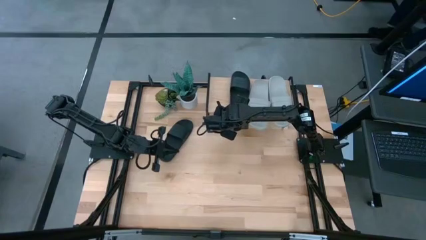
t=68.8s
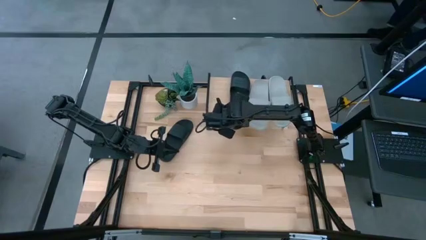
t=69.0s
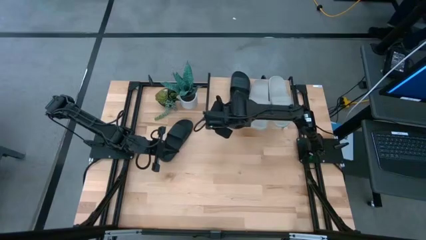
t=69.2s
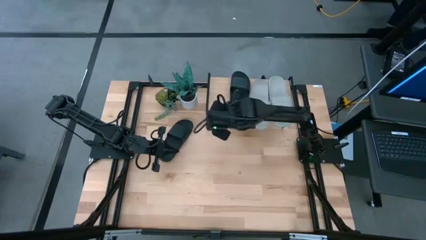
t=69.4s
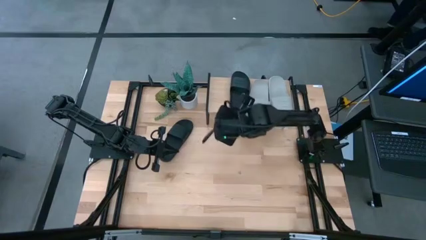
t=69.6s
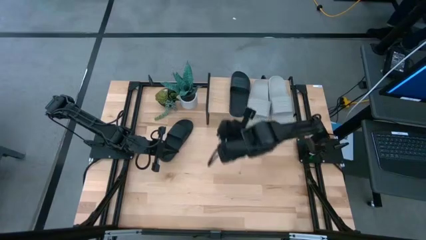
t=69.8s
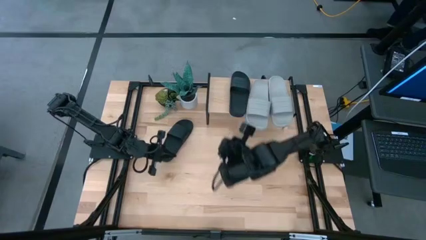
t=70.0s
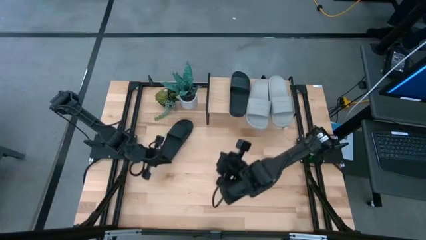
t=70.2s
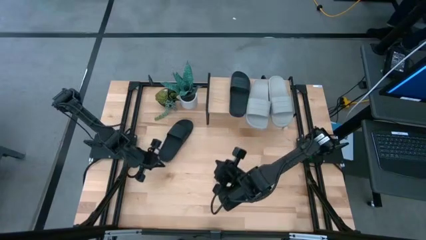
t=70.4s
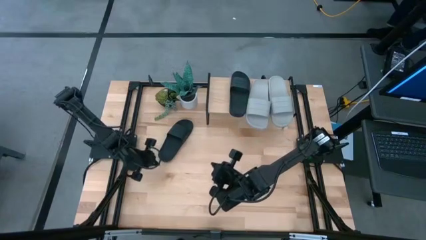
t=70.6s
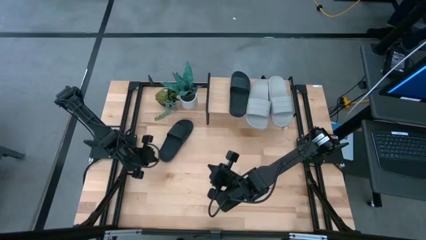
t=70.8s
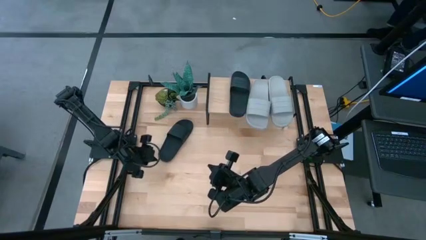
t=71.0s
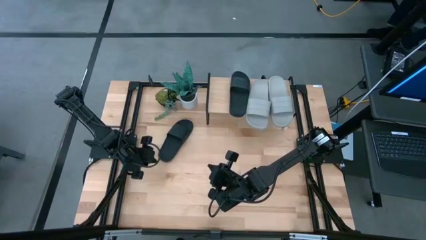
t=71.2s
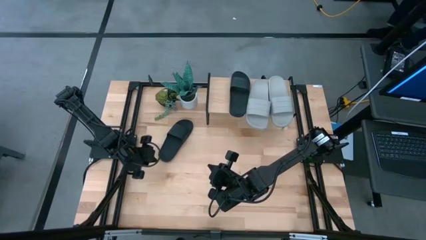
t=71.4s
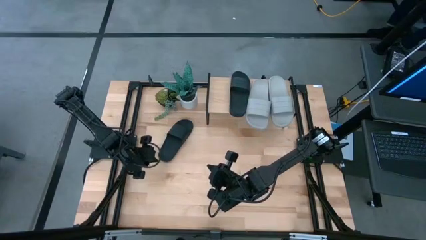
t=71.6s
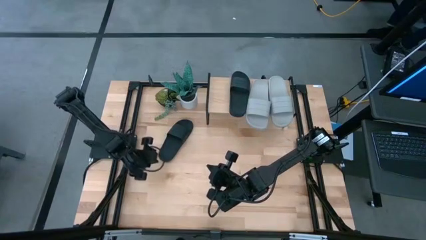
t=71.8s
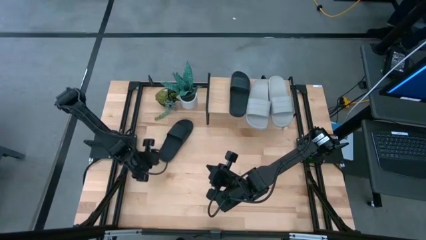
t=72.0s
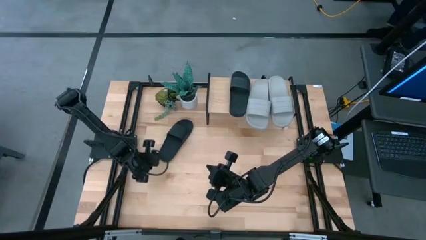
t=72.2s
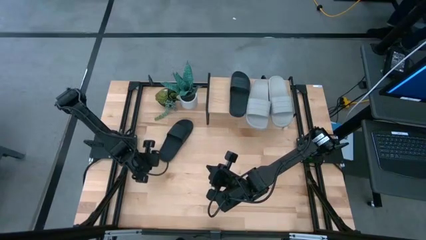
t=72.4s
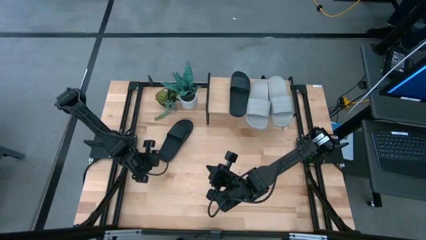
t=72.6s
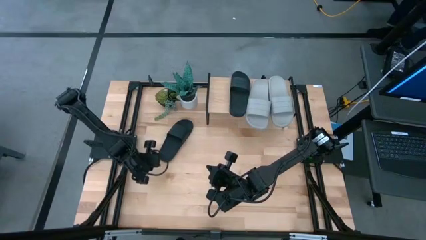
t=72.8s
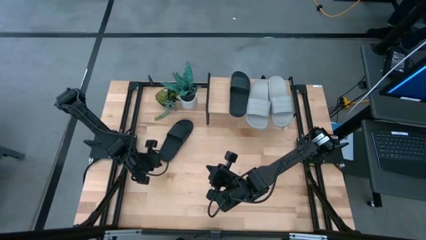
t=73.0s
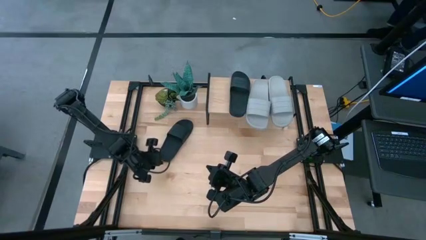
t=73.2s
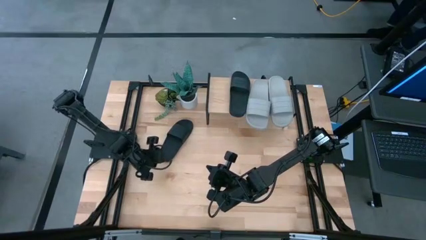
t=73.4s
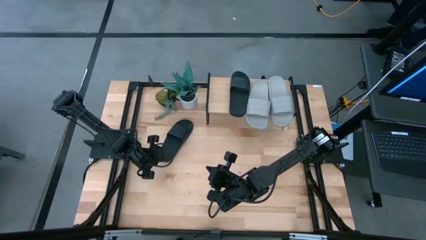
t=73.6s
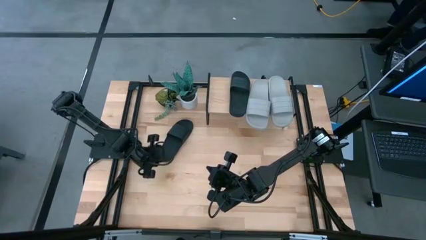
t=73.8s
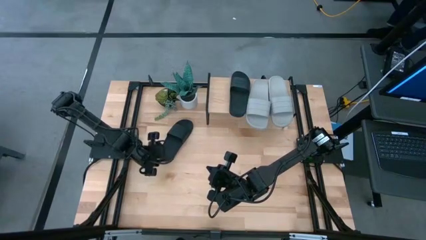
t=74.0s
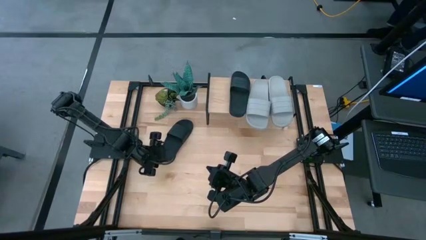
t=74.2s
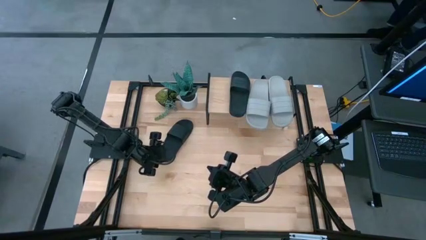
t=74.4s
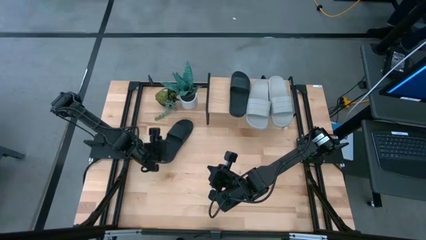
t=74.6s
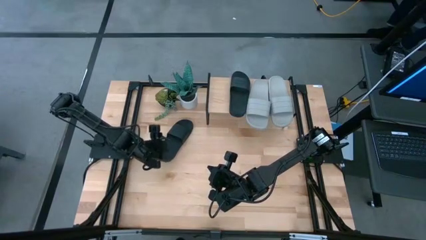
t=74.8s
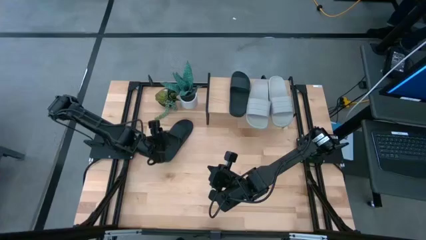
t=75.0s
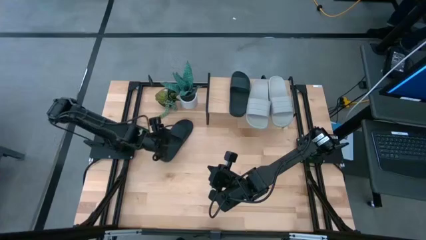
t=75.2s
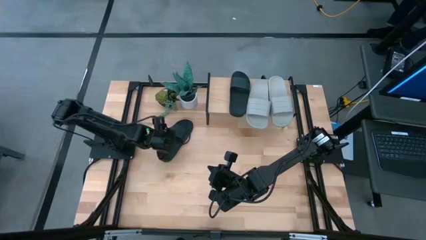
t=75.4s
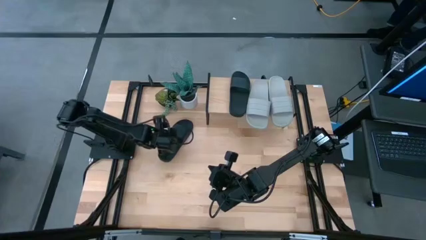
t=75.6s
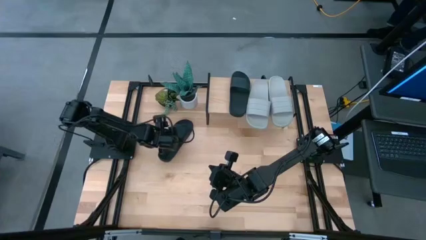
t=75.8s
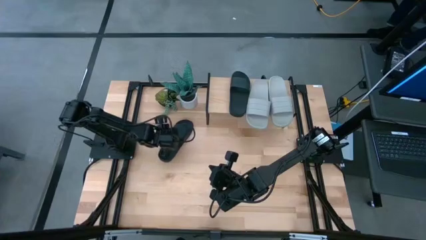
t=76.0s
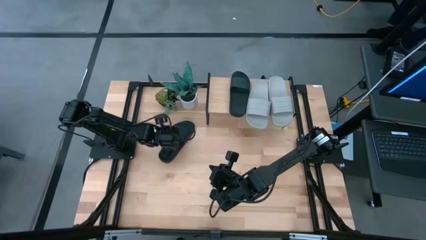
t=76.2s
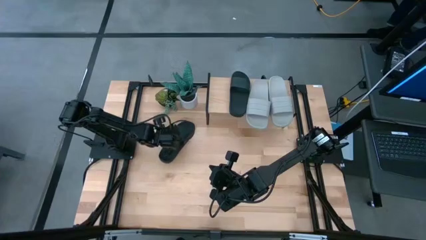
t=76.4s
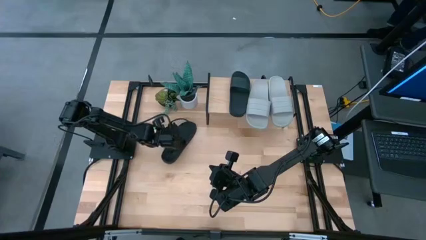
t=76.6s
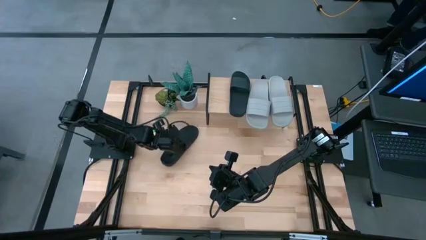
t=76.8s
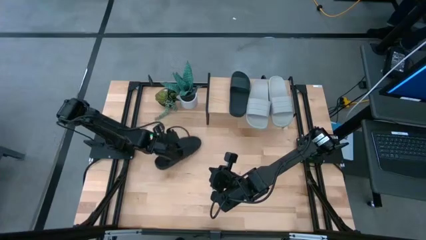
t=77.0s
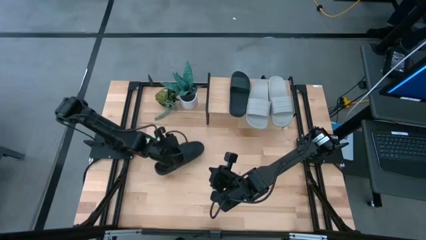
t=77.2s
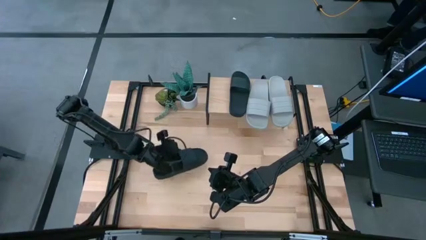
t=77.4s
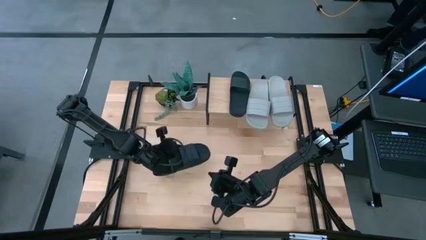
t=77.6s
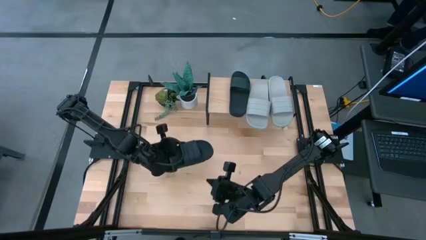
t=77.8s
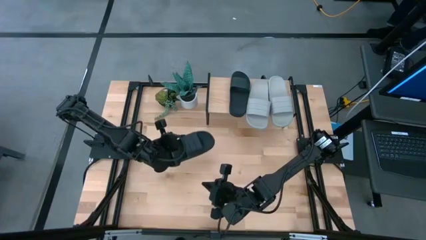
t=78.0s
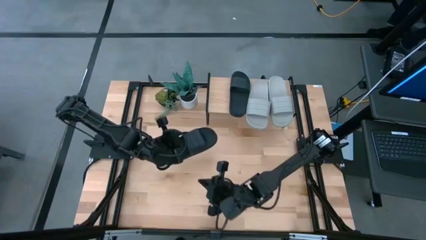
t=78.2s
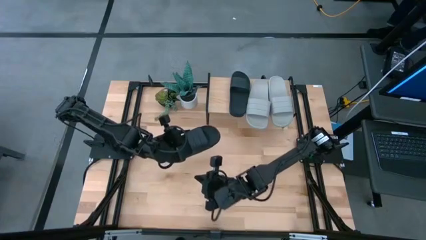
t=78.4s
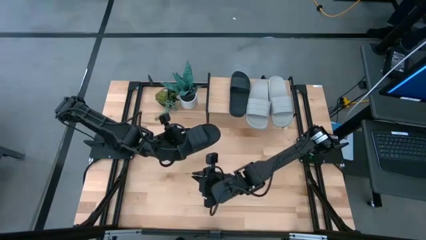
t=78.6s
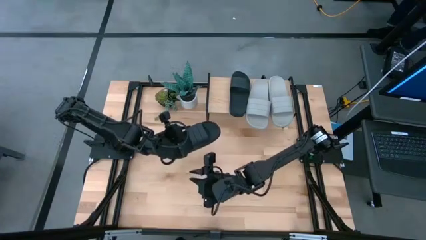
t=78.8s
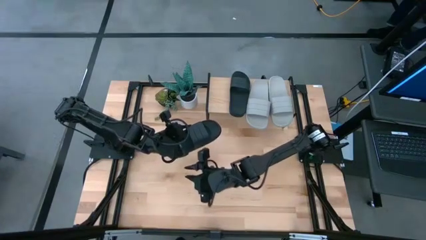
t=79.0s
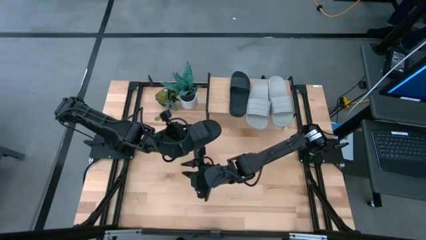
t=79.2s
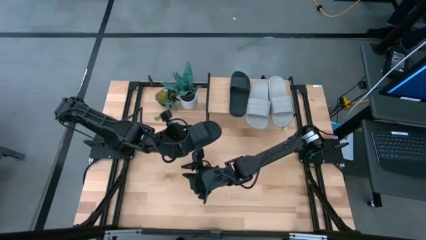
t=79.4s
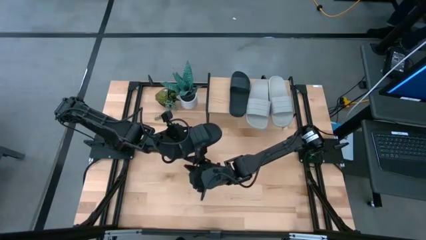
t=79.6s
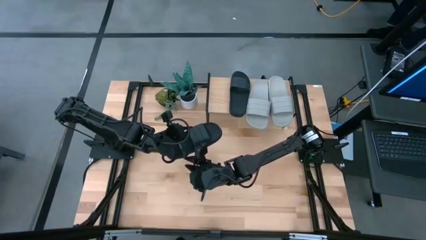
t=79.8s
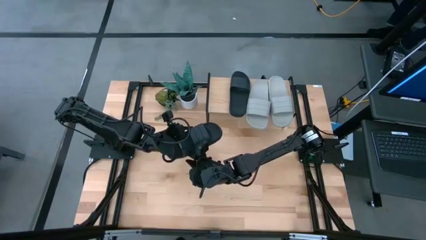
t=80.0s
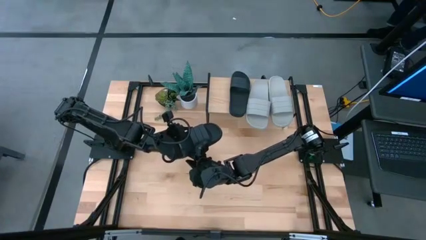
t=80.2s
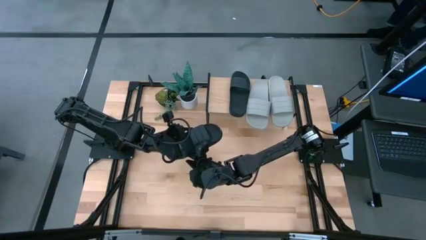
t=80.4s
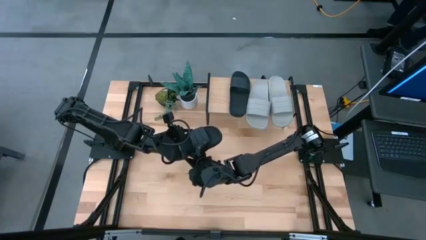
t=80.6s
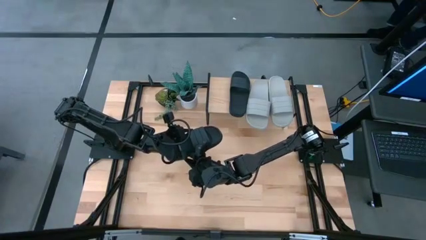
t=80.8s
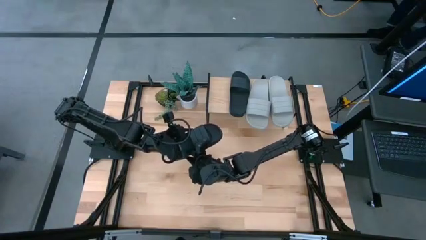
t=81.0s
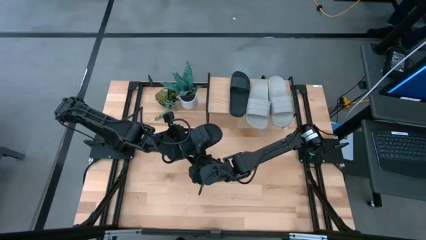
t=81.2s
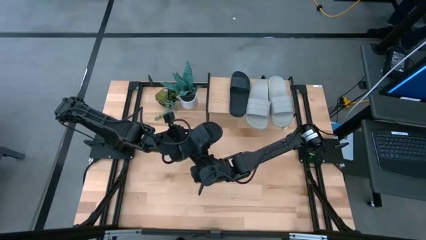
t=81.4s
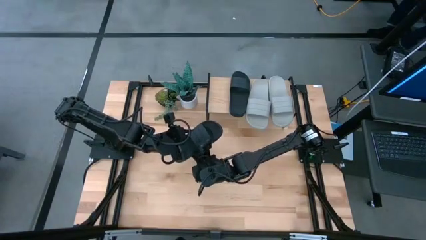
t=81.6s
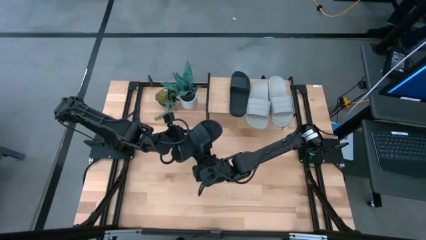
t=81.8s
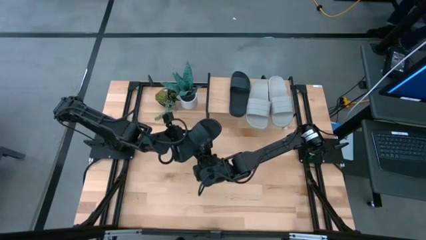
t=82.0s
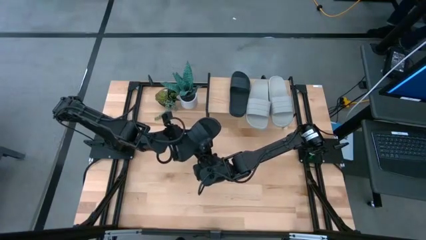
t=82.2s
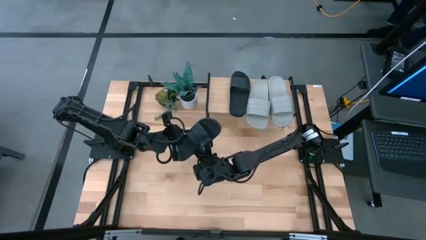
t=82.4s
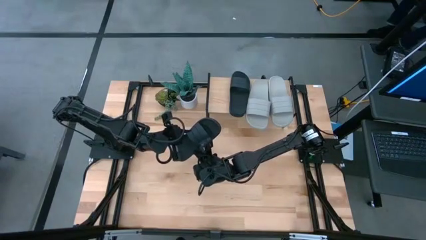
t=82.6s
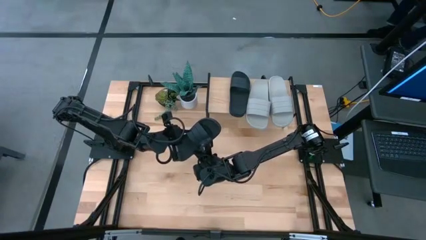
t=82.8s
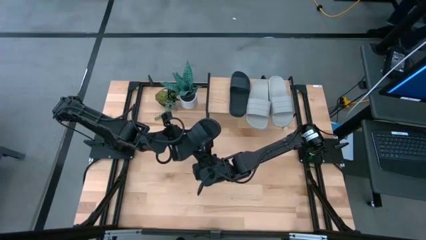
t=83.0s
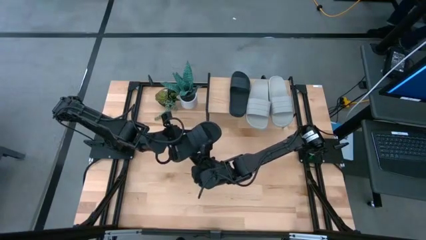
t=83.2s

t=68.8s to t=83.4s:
Task: Pick and place slides into the shelf
Put the black slipper on the shelf
